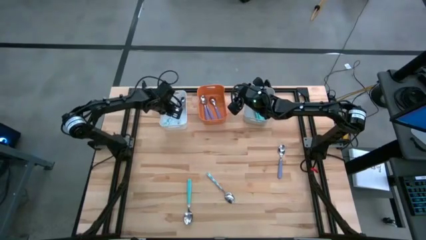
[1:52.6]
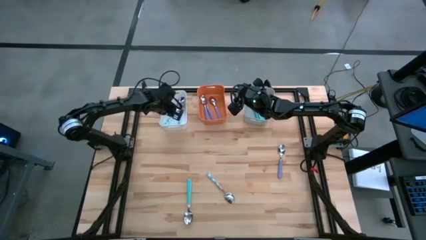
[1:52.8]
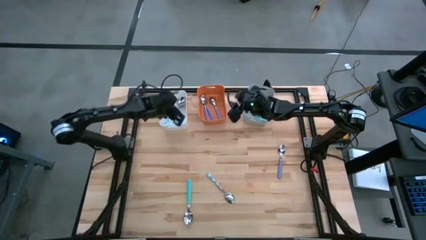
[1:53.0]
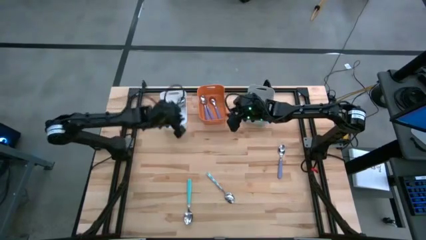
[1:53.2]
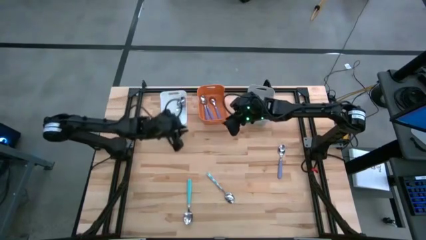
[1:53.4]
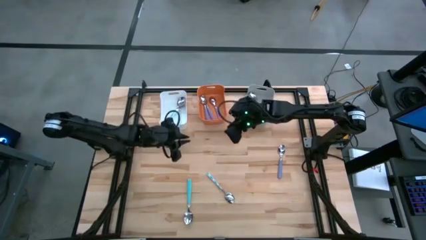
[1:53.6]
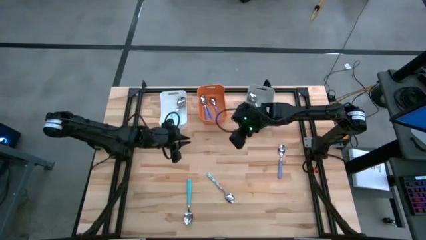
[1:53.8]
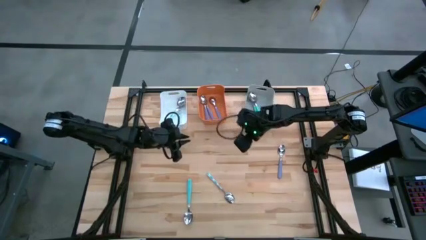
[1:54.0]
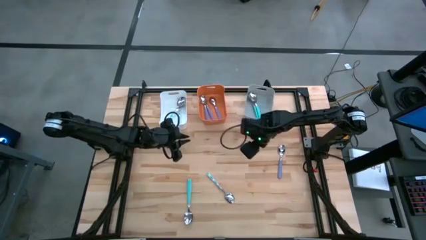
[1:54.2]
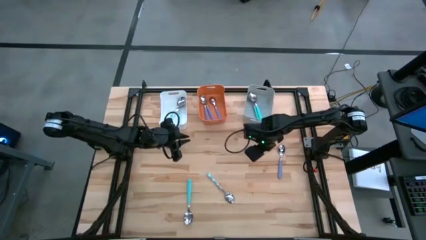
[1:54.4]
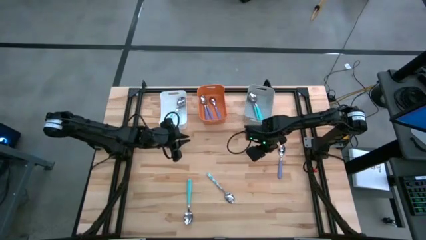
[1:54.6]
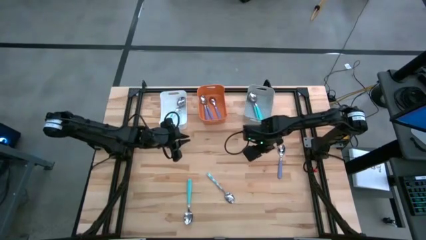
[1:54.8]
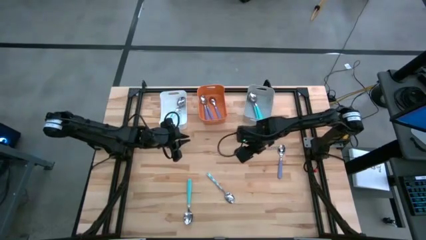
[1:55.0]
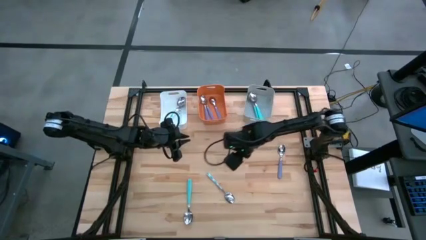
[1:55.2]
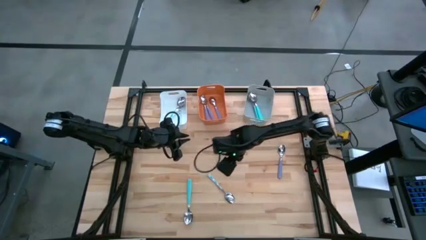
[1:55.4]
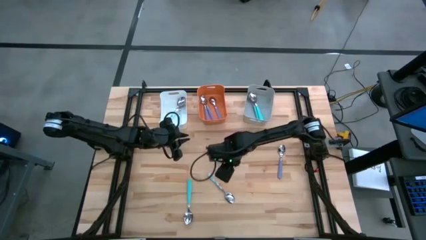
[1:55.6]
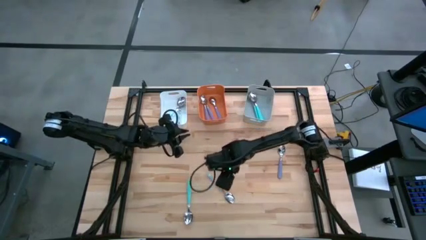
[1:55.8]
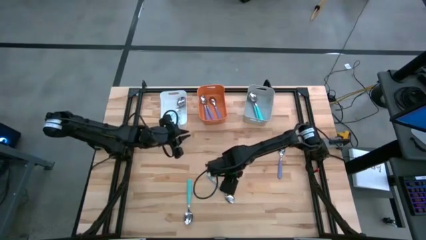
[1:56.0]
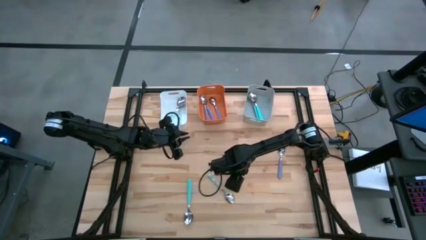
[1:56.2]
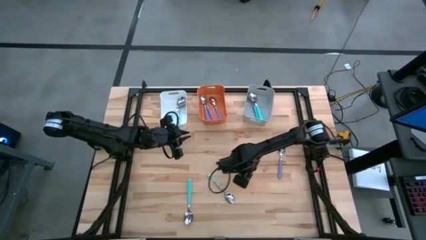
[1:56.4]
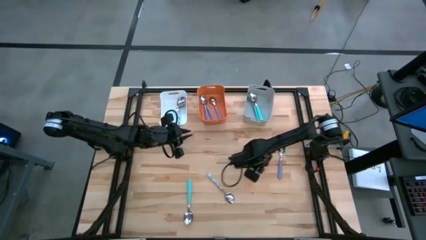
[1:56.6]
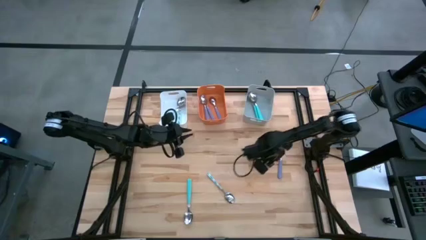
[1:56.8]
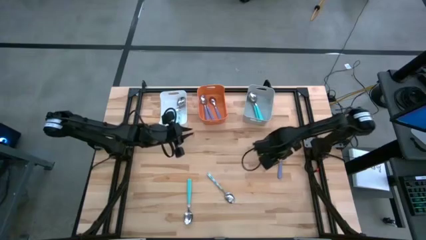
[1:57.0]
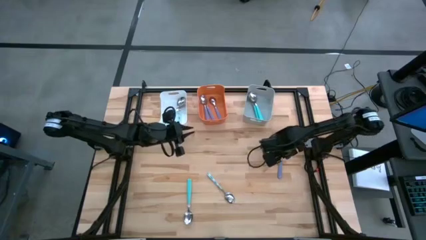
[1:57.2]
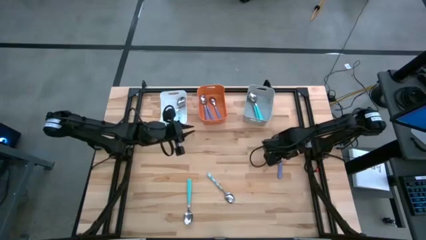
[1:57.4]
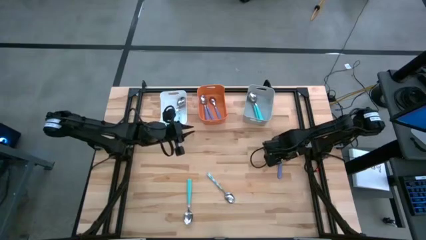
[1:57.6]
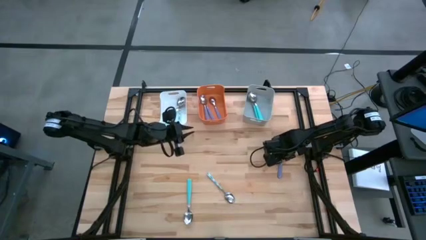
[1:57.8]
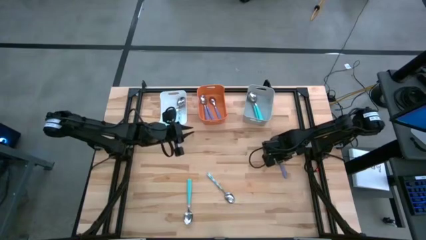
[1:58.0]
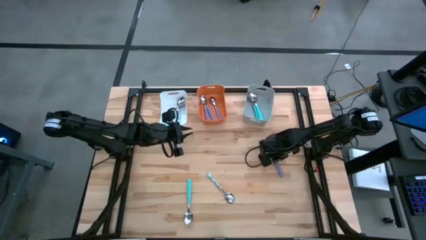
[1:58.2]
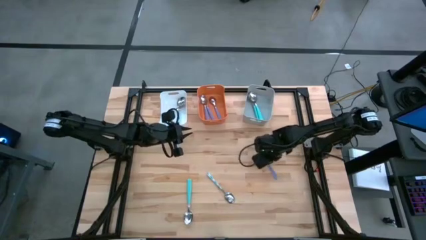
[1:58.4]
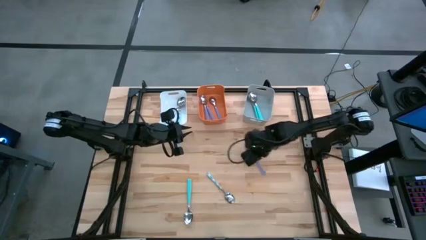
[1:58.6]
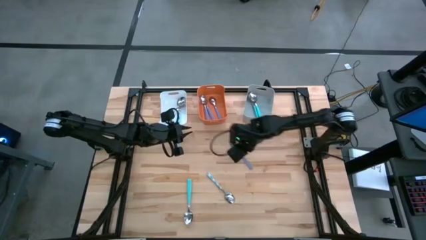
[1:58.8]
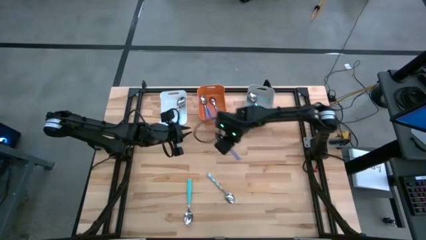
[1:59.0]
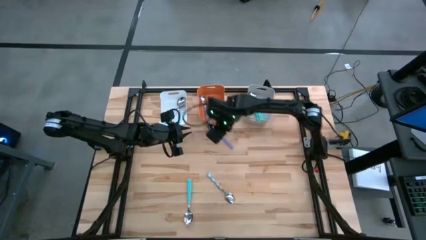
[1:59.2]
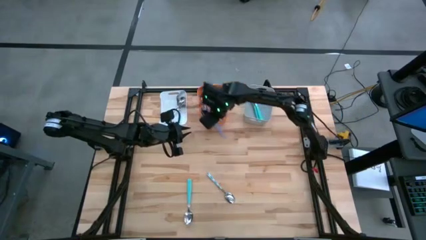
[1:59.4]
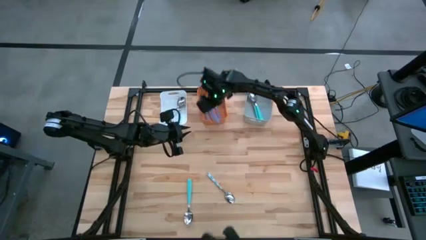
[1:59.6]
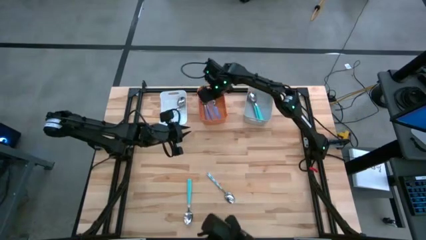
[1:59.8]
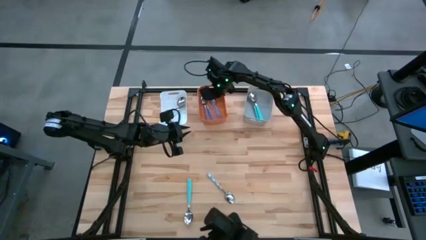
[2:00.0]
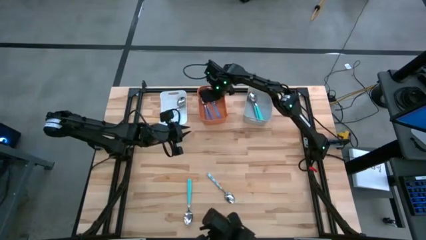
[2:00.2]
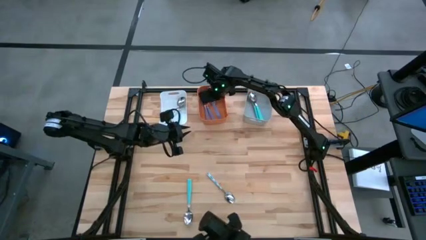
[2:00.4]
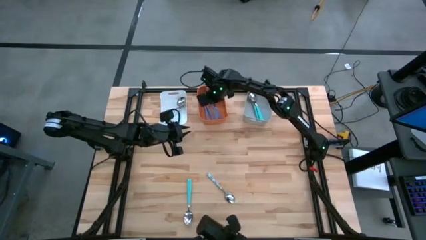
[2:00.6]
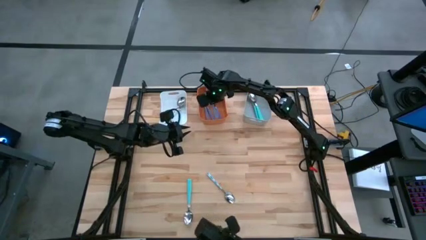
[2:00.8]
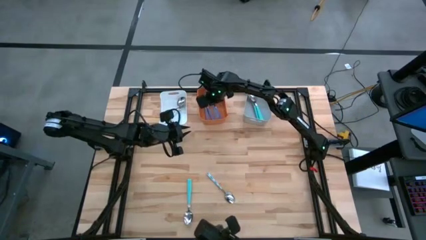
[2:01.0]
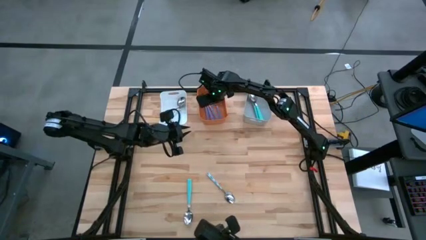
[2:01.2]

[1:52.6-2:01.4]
Task: Sort silverware by color (type)
Put the purple spoon into the orange bin
